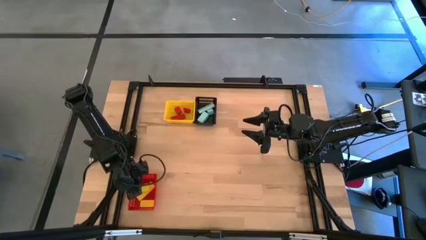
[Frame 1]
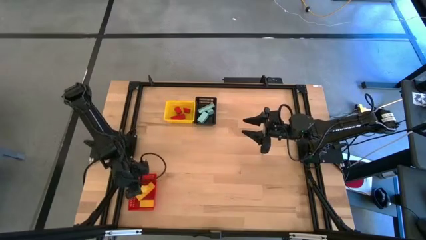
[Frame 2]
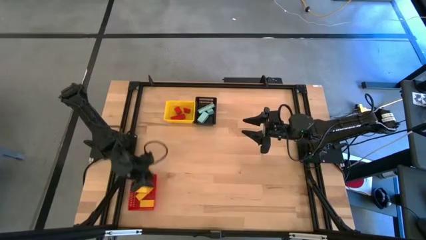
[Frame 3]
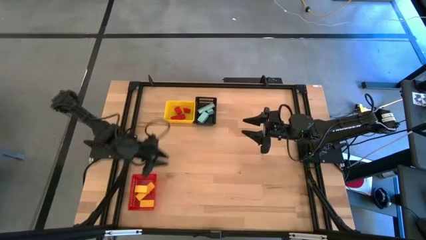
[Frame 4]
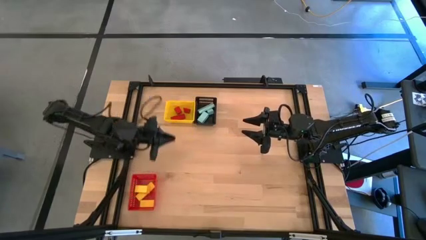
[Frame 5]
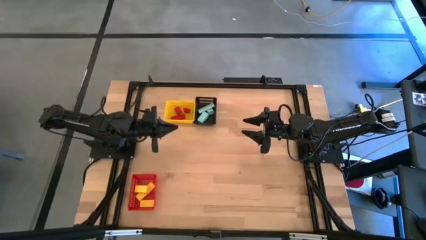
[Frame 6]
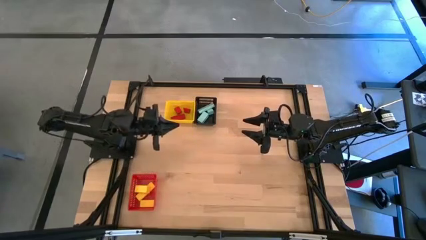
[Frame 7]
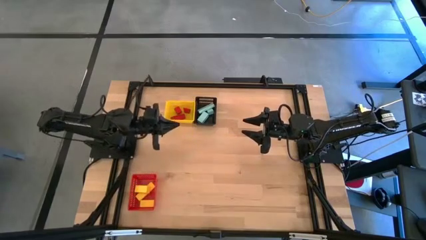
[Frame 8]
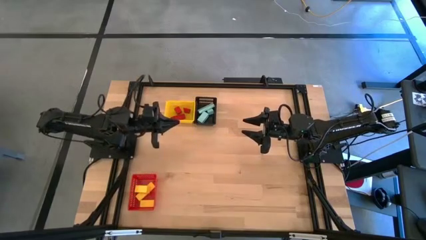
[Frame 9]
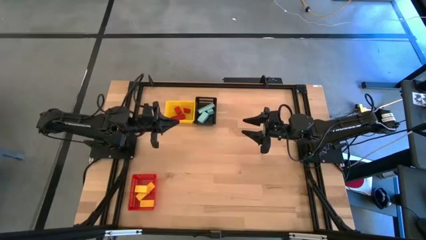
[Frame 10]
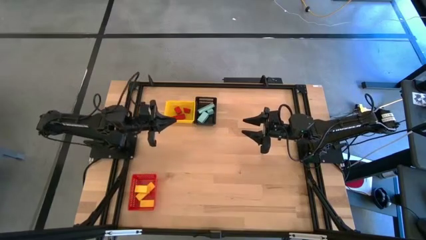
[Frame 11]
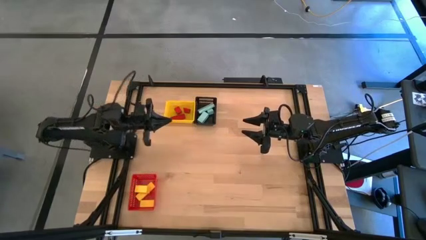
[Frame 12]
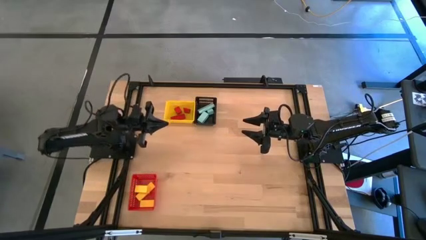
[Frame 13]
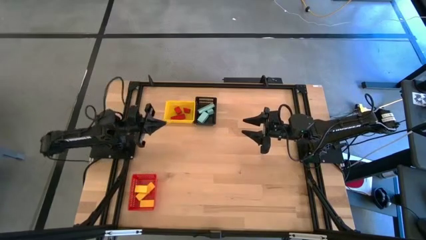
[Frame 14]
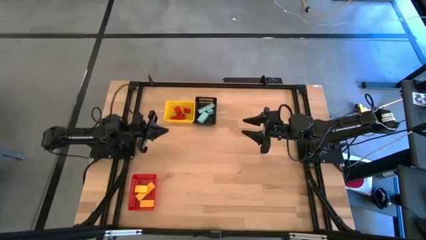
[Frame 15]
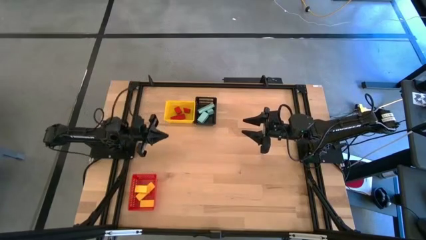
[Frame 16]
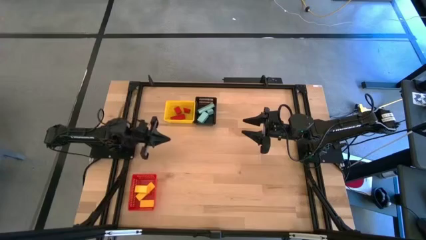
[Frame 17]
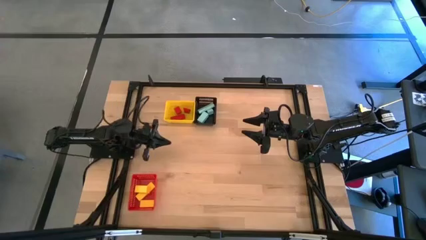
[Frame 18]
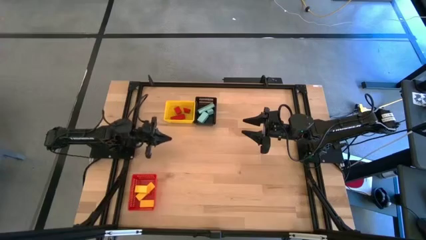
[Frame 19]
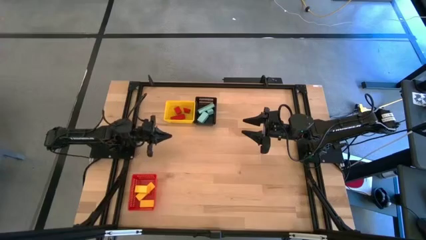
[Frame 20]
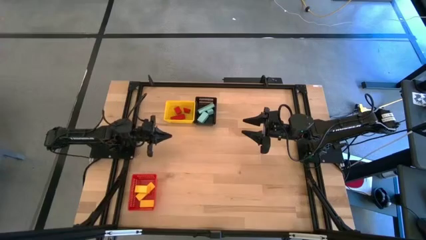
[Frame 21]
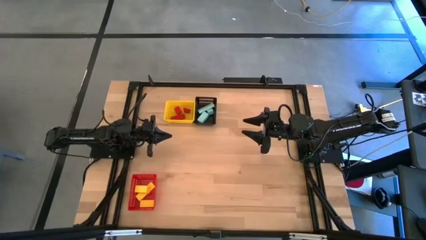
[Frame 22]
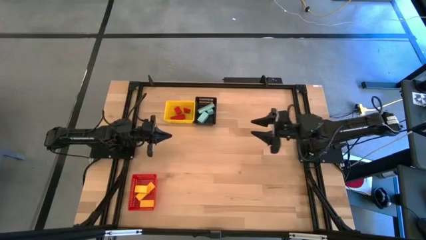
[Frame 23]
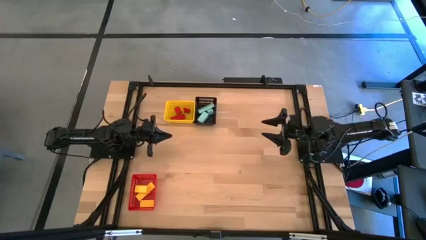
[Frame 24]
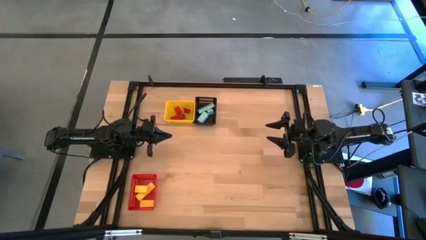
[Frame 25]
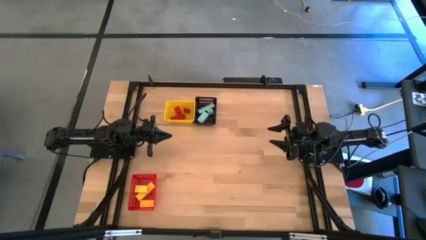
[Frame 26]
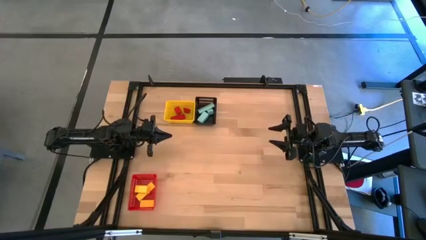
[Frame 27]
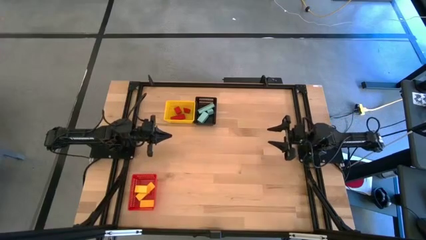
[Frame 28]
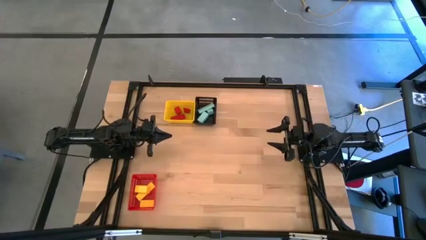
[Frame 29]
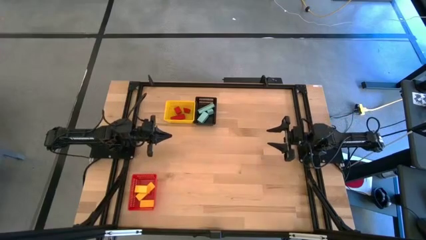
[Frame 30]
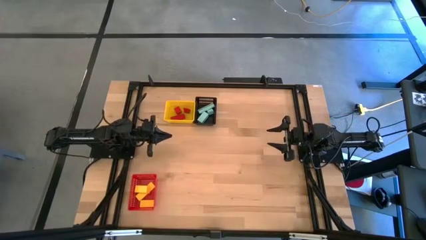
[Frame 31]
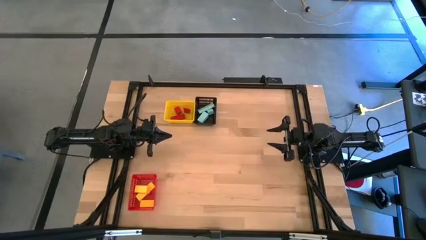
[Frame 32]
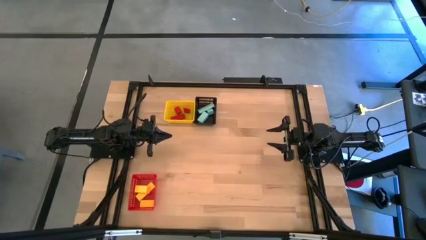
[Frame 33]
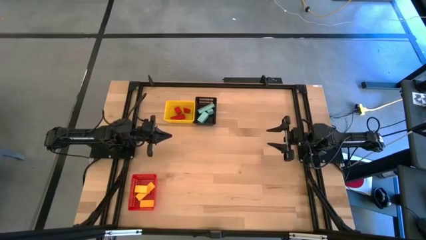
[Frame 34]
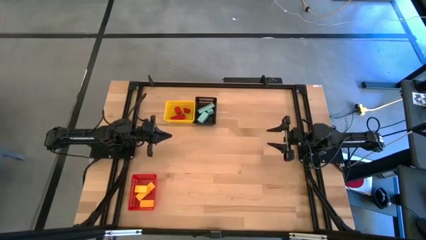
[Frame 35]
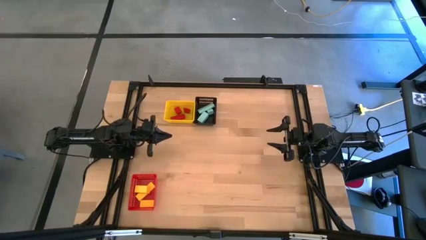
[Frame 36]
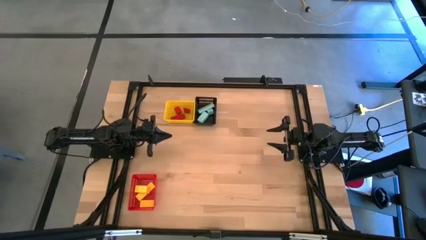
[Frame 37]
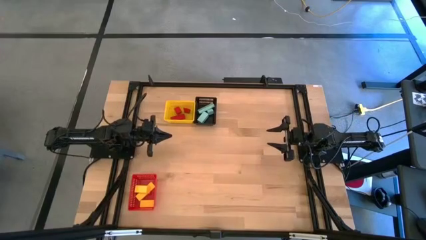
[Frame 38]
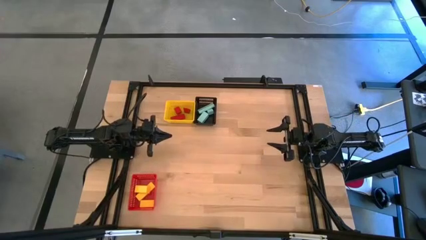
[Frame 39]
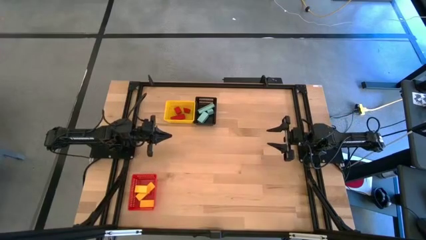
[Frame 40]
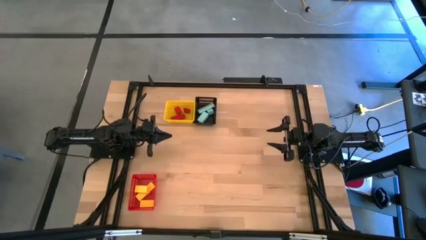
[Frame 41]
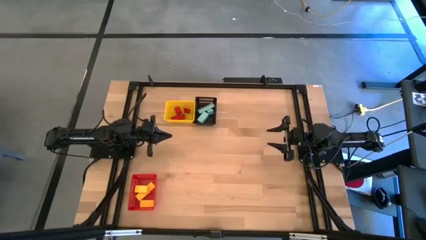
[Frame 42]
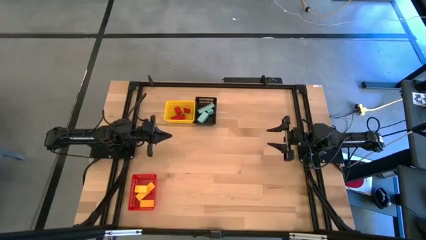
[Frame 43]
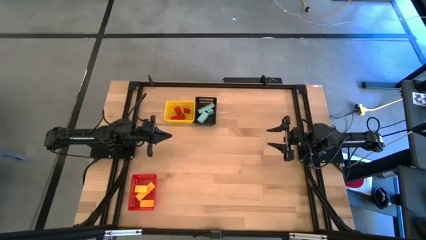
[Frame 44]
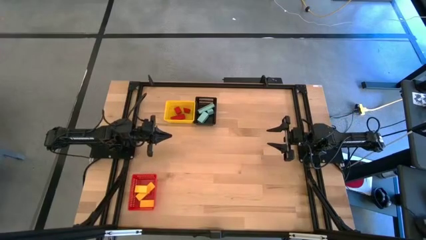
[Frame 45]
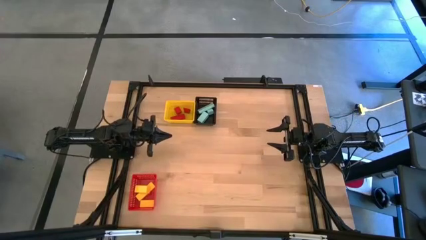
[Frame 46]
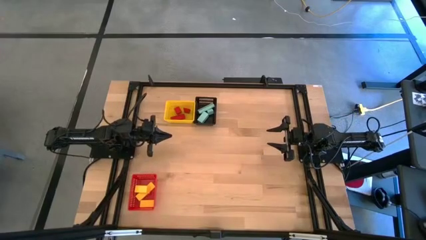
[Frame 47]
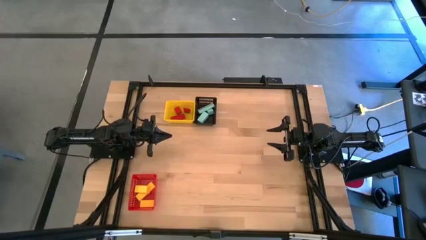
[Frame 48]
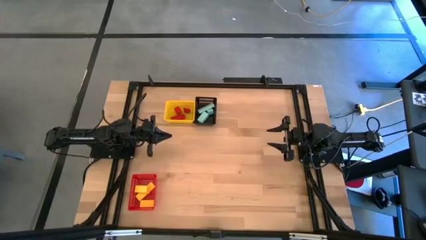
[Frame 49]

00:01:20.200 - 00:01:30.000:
Task: Sort & place blocks by color
Return to Home Position

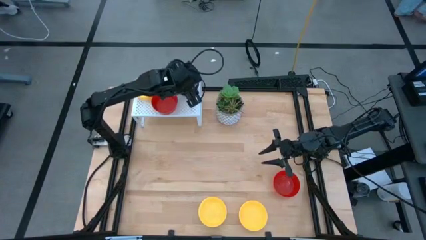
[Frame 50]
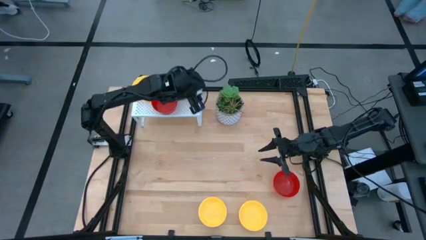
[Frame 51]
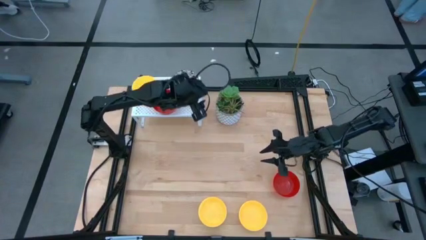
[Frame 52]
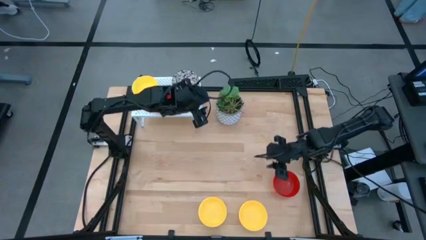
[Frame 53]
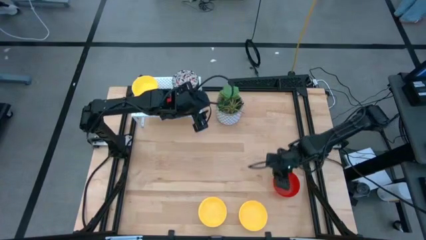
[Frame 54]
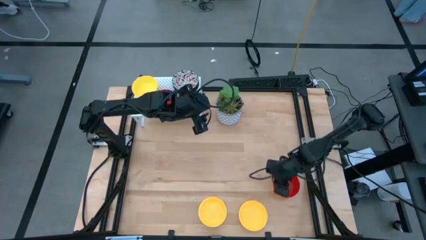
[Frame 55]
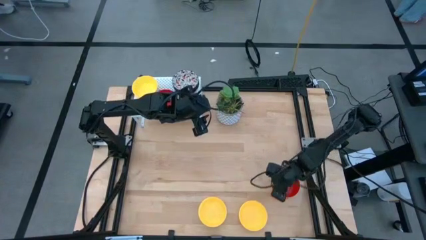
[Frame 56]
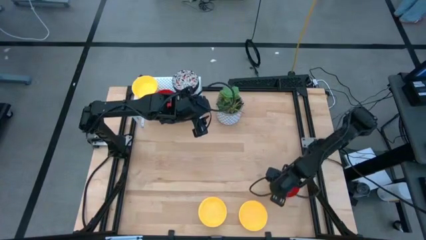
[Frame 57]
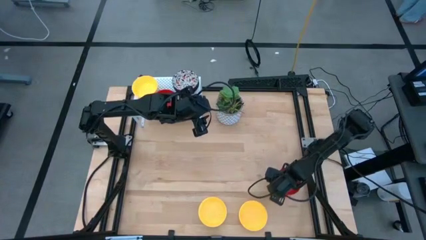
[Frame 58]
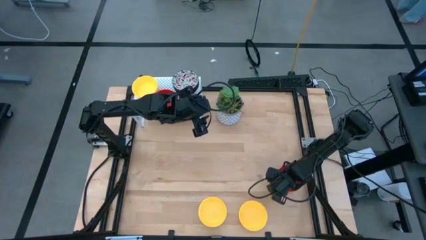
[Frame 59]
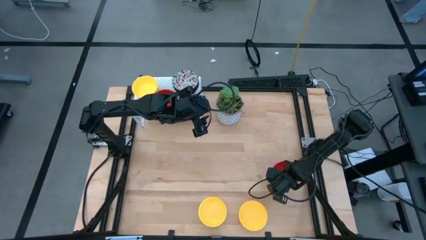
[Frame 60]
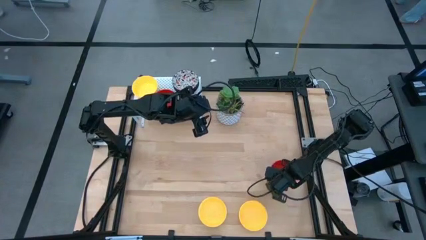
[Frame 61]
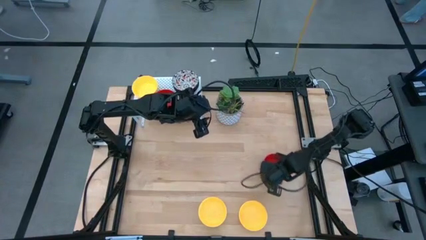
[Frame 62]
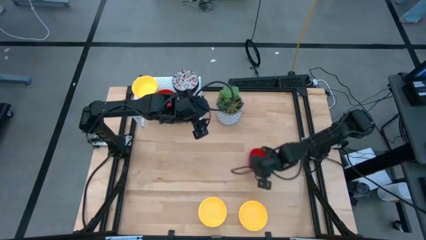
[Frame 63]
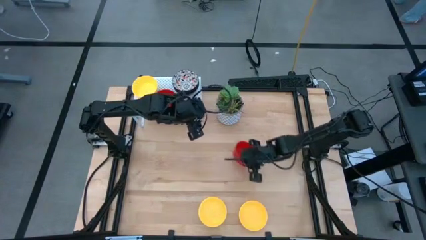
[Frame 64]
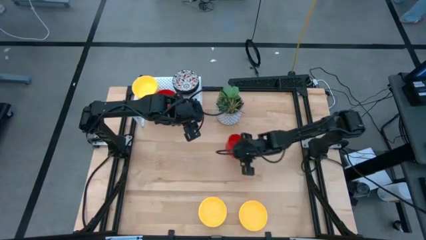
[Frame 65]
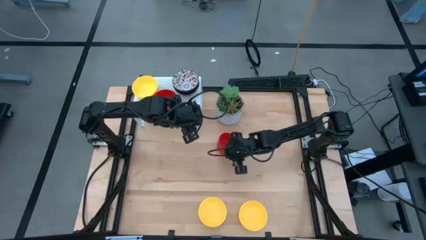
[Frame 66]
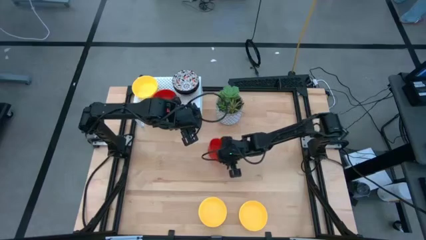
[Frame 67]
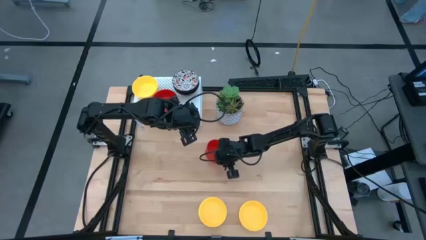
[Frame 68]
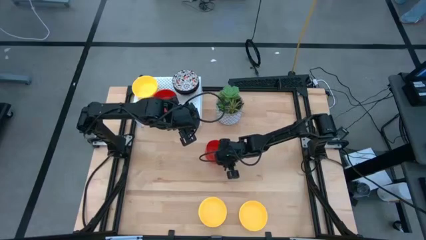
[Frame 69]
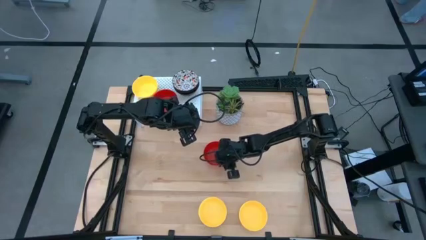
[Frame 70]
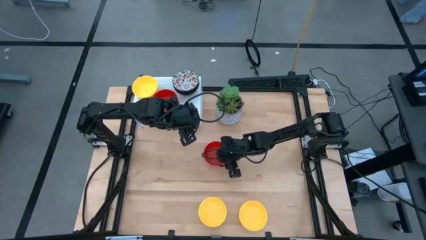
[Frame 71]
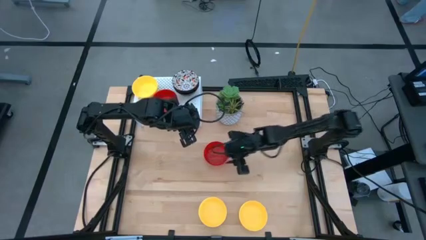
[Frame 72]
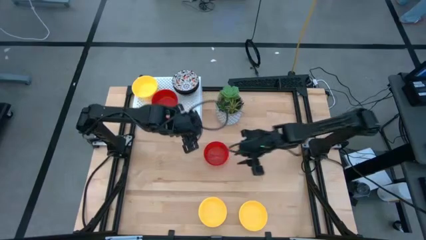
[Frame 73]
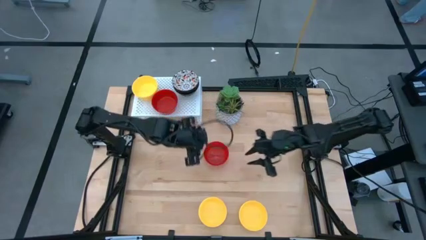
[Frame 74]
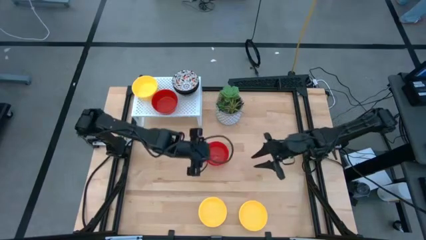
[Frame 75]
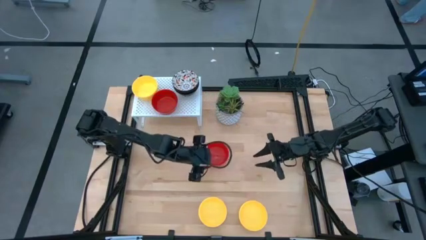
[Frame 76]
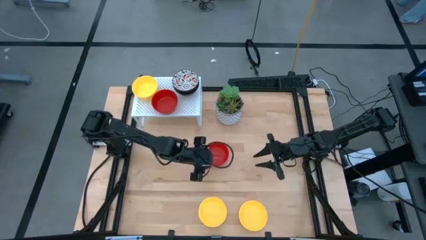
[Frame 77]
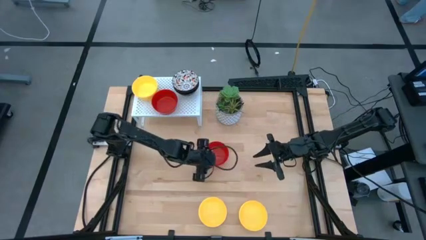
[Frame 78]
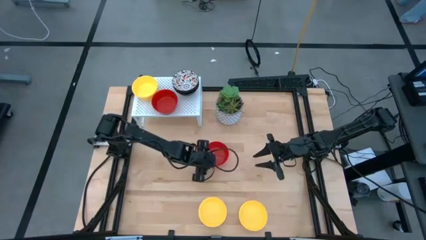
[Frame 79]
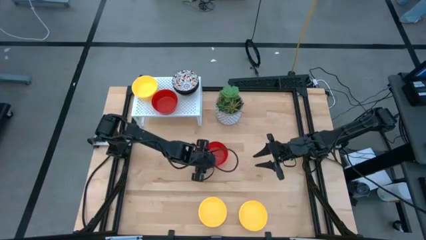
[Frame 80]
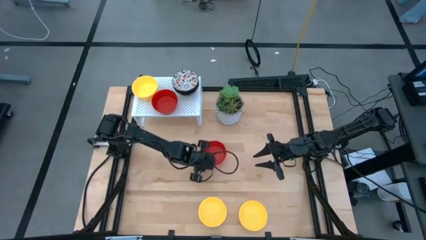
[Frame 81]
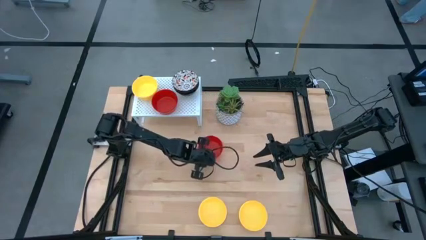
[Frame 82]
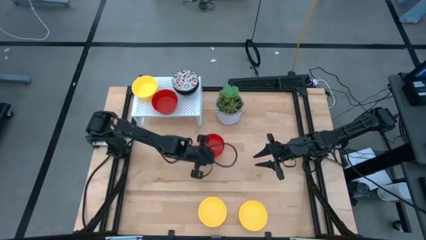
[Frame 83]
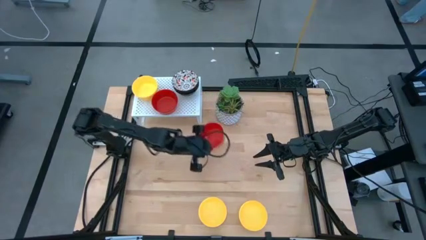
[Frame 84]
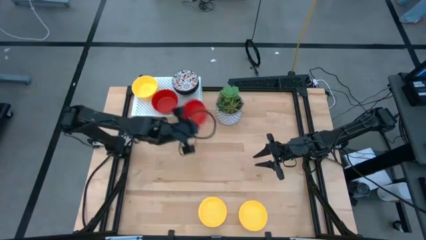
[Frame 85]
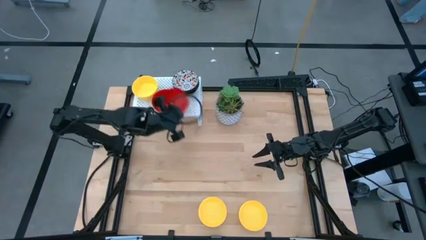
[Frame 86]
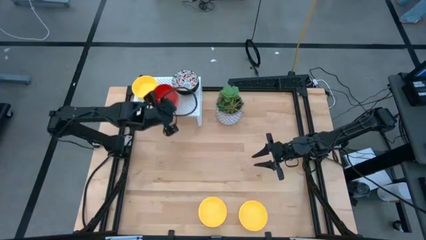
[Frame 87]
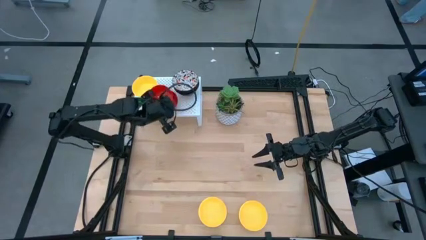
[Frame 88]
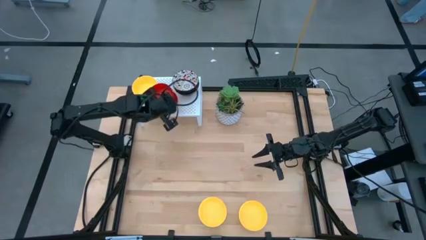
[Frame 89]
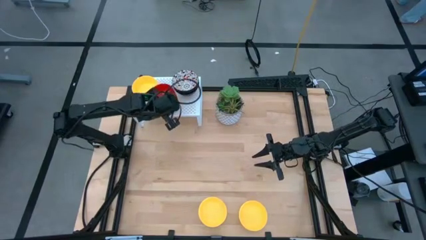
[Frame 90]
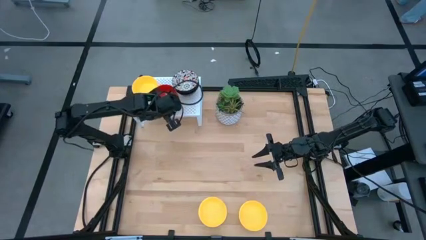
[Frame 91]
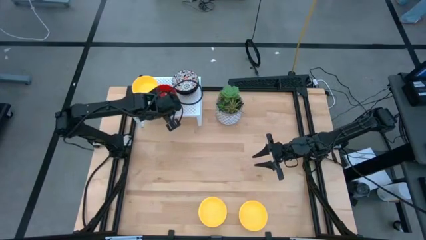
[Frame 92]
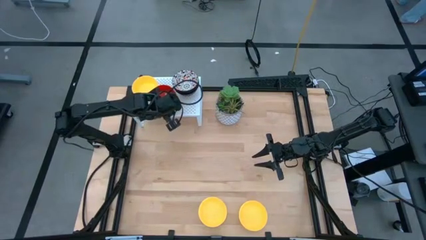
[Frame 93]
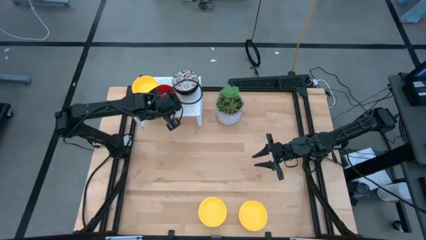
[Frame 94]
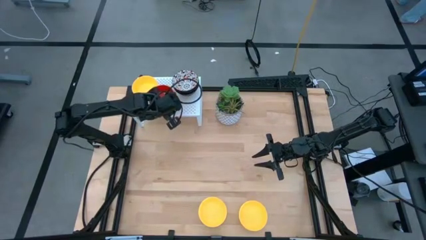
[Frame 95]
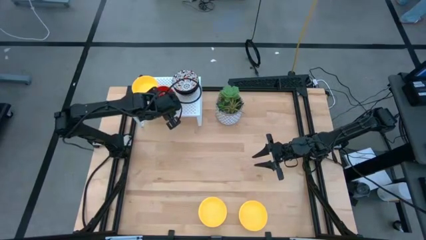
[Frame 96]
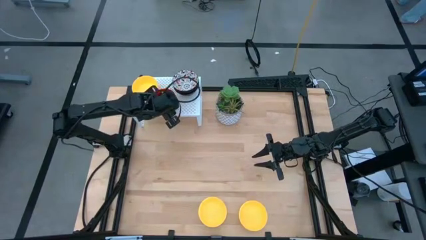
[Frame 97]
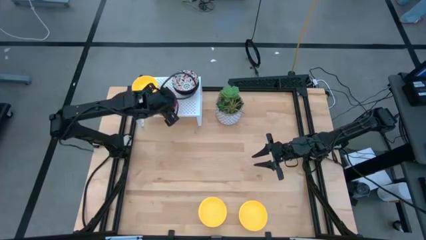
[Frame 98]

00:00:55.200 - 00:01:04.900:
Task: Pick & Place Mini bowls
Stack the red bowl on top of the other red bowl on the shelf
